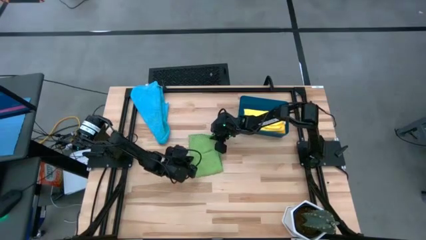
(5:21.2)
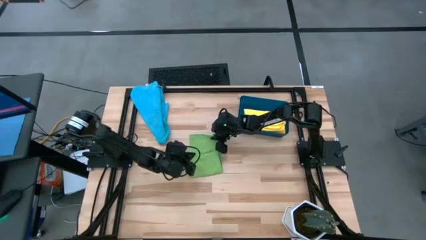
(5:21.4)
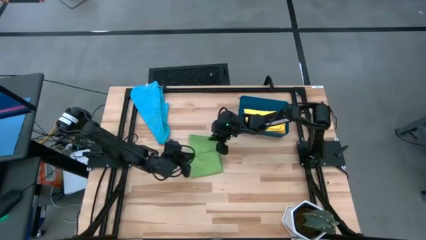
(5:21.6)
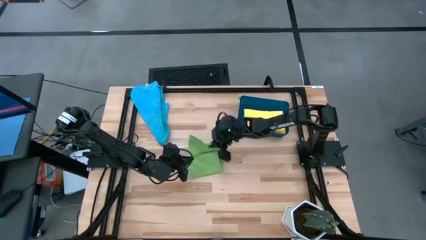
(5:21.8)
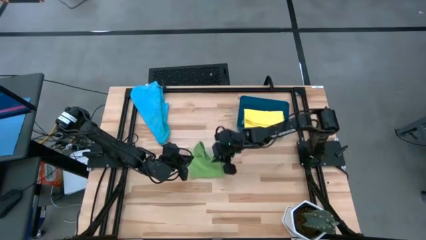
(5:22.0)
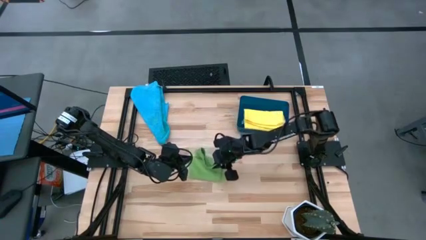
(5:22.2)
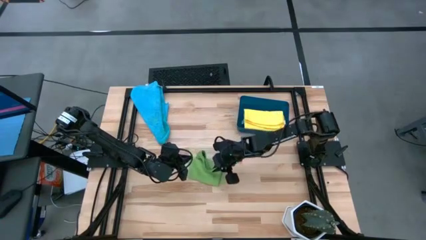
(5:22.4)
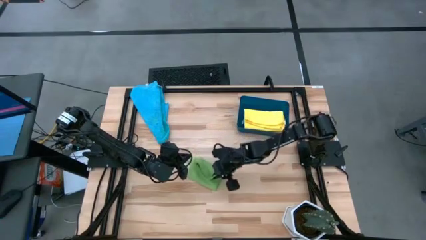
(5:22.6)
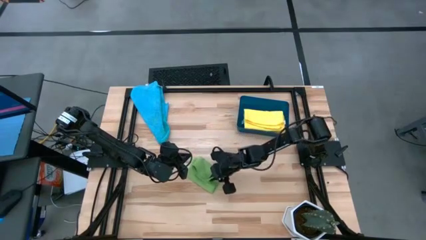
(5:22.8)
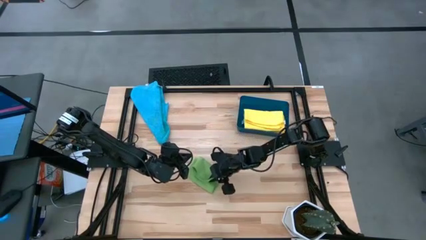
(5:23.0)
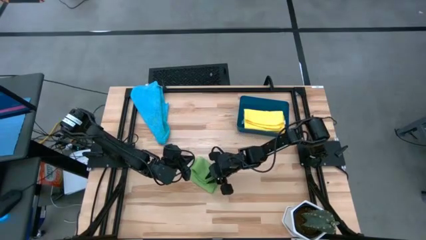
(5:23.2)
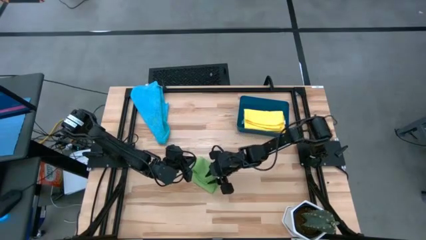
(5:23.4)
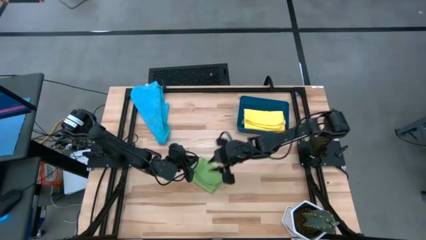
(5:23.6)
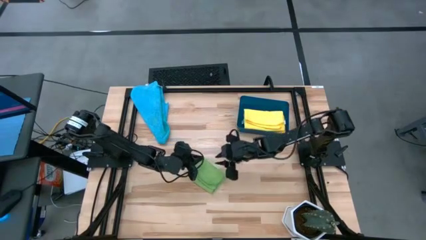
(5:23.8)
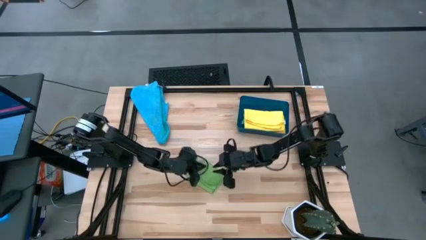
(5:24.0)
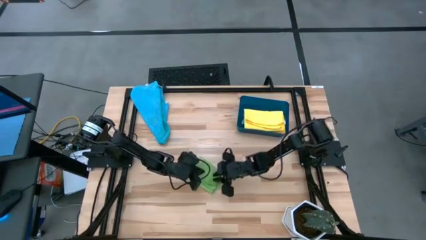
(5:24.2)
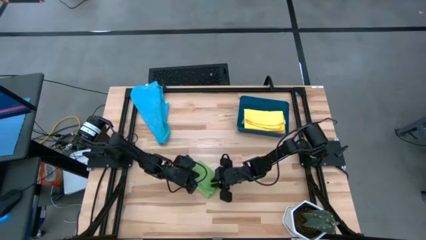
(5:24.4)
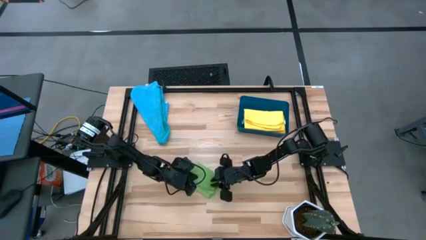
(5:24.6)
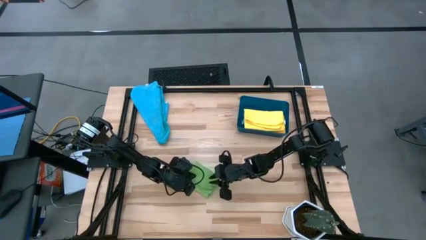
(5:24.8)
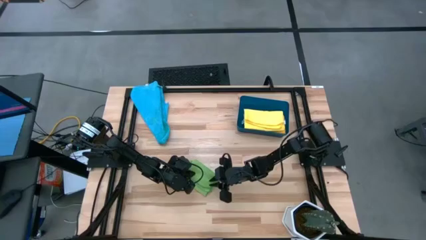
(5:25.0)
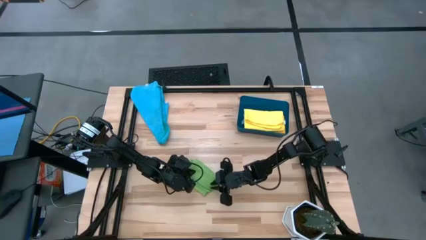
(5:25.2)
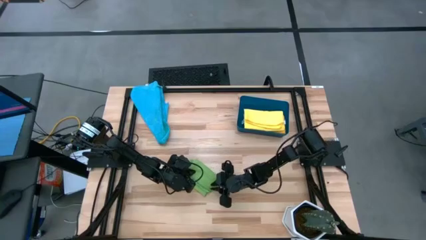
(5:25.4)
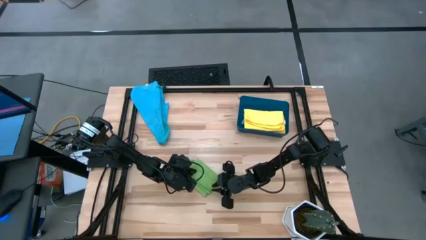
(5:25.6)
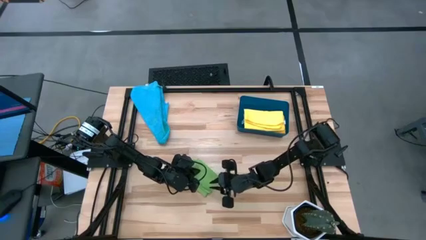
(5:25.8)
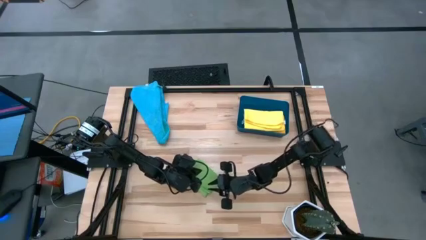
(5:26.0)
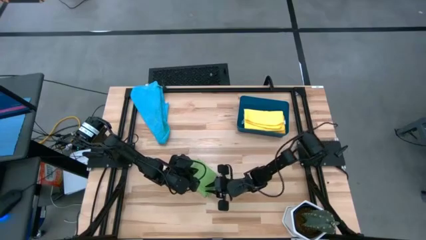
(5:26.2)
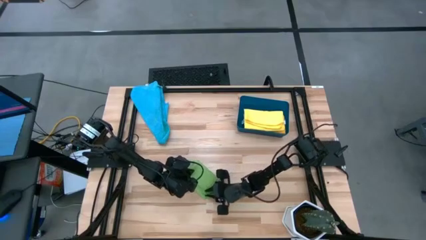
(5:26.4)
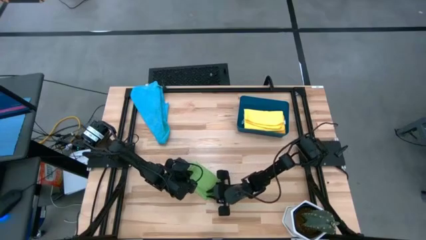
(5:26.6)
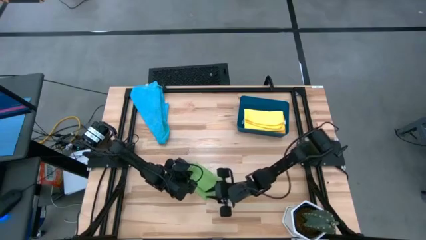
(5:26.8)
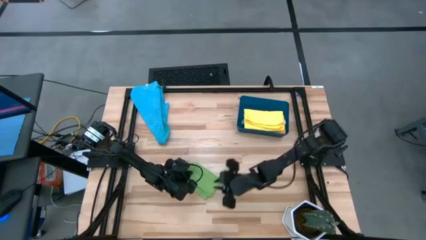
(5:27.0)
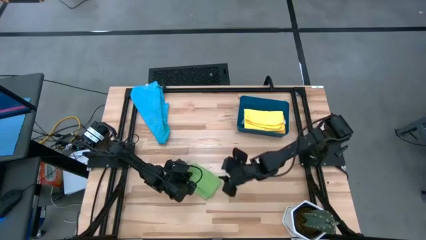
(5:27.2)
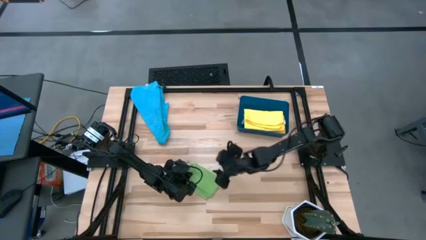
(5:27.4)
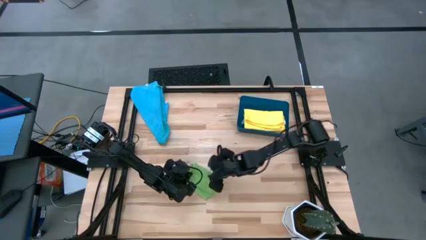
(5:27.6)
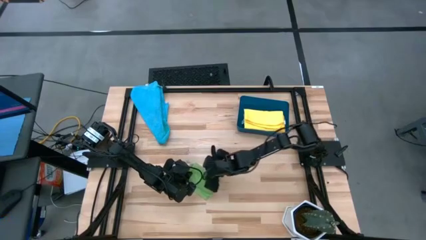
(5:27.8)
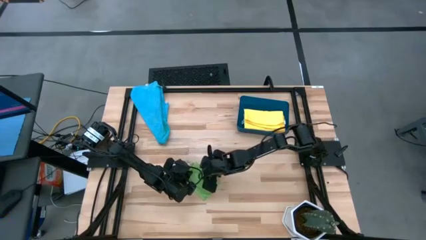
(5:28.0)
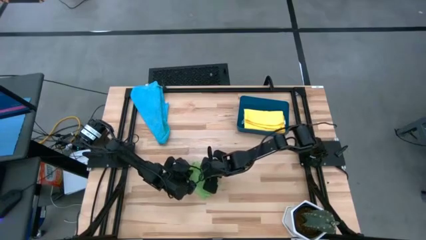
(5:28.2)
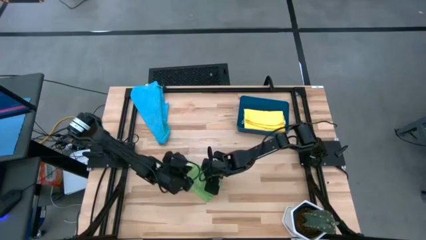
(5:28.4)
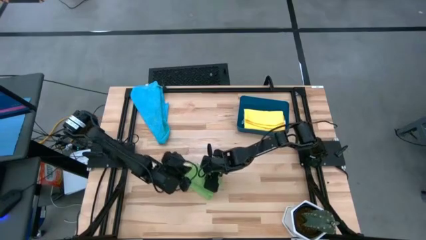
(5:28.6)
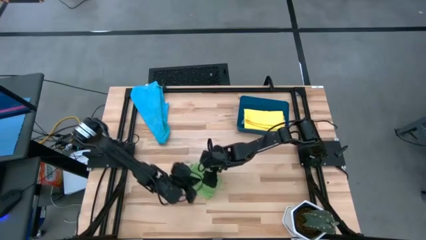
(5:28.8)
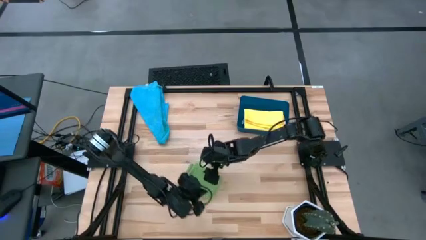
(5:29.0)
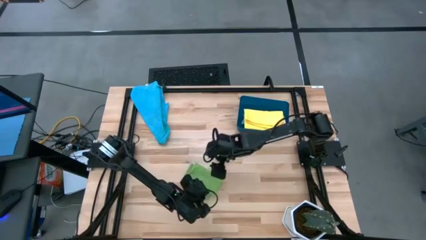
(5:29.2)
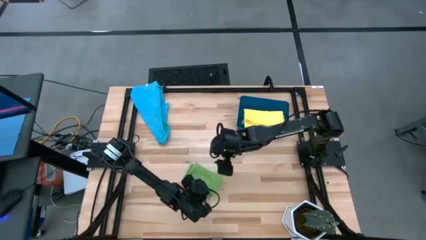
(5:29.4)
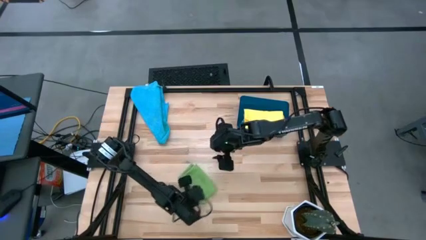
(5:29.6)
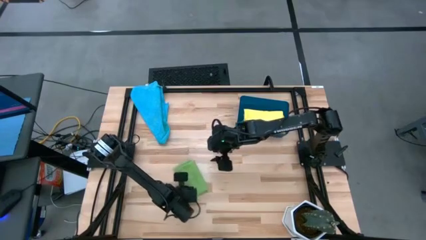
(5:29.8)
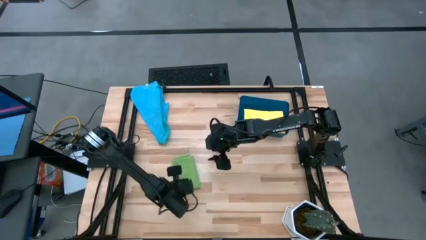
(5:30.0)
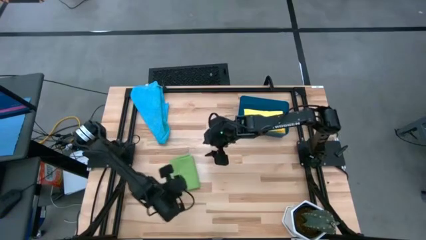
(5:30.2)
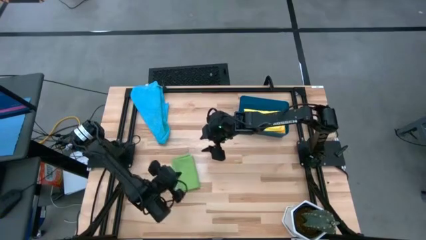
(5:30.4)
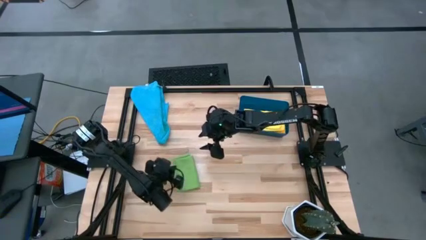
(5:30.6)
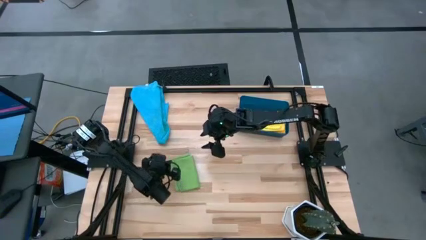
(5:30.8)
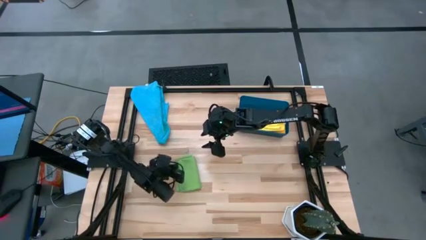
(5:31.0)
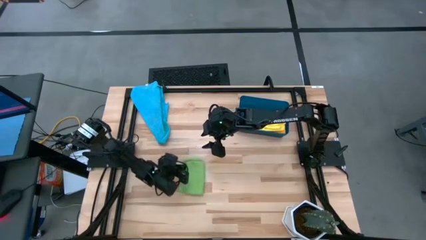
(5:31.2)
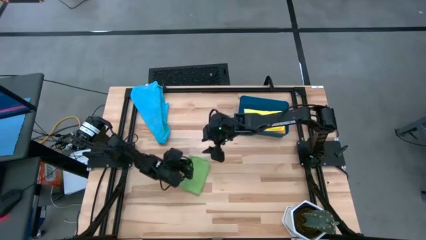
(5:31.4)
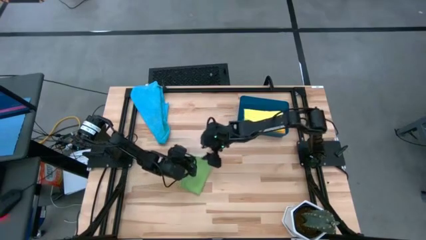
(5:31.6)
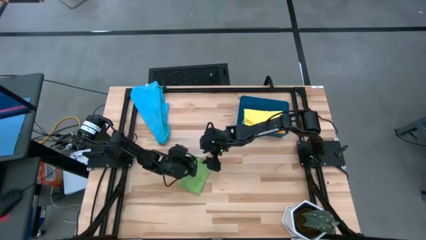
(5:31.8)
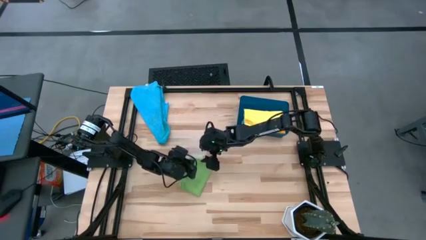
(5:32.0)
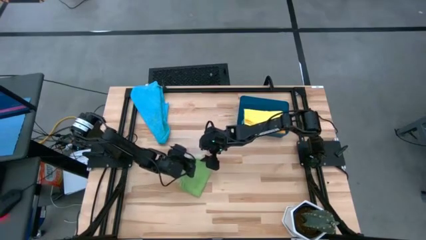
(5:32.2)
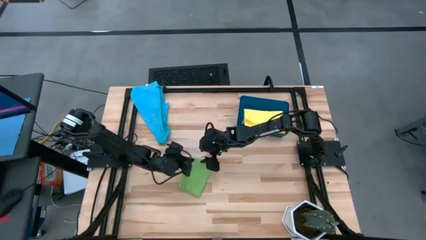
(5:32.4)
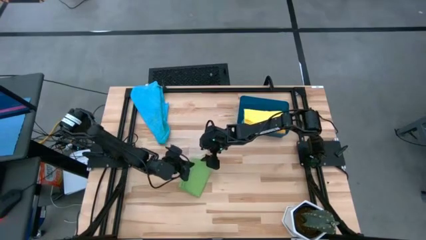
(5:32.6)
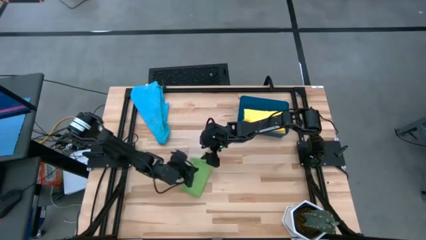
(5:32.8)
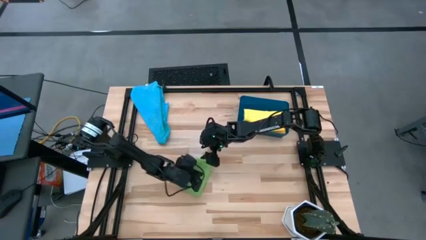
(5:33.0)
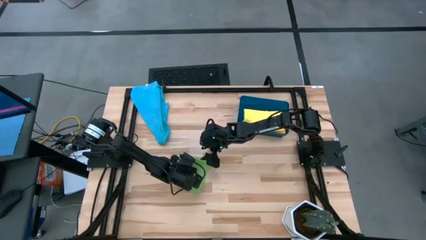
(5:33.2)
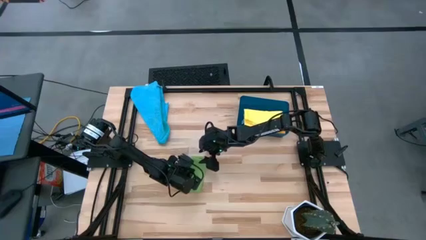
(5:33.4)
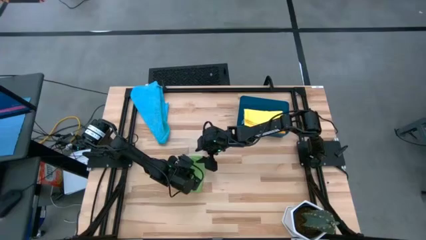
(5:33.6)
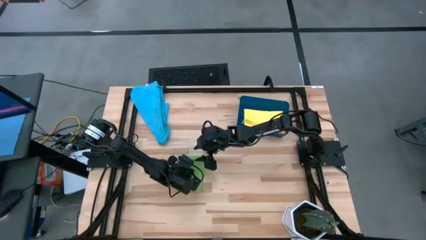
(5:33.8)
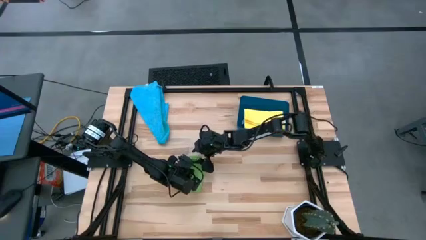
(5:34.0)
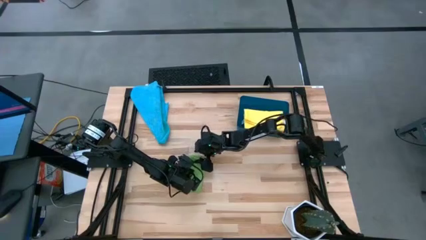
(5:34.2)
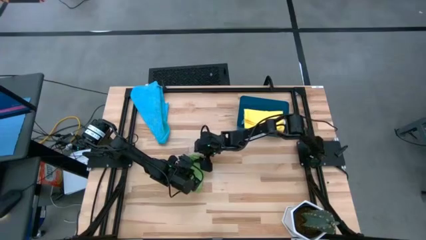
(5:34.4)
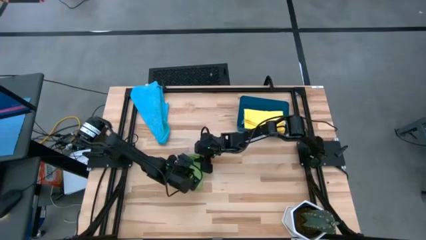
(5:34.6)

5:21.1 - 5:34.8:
Task: Fold microfiber towels
Fold the green microfiber cloth

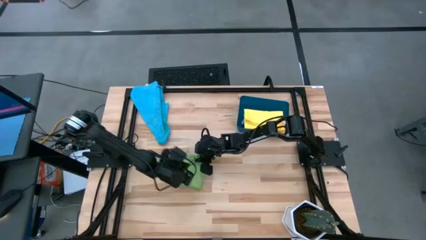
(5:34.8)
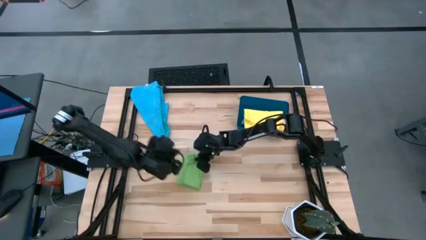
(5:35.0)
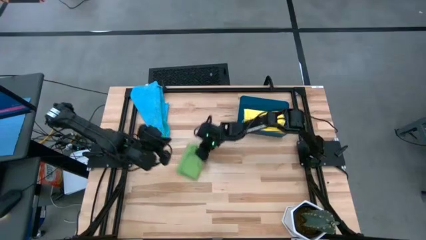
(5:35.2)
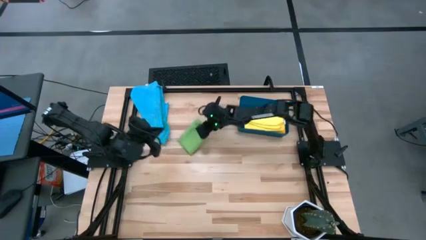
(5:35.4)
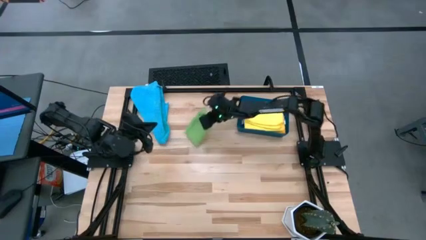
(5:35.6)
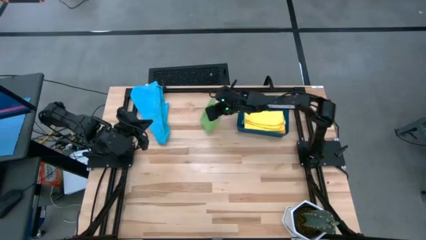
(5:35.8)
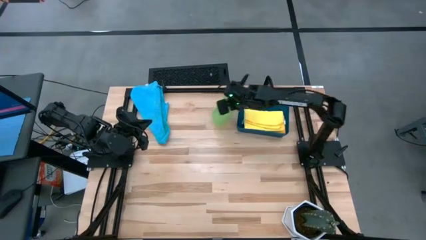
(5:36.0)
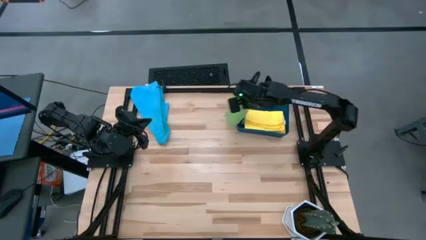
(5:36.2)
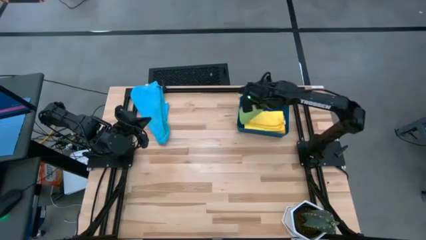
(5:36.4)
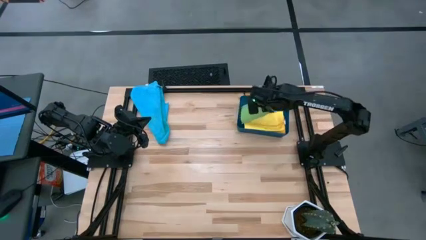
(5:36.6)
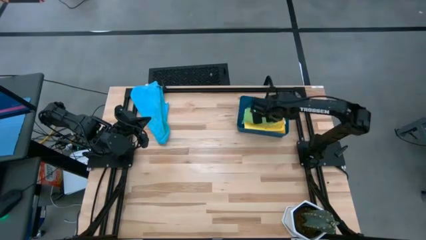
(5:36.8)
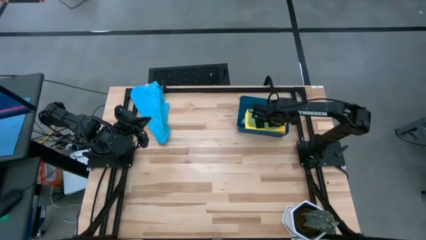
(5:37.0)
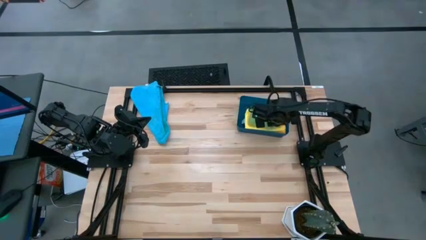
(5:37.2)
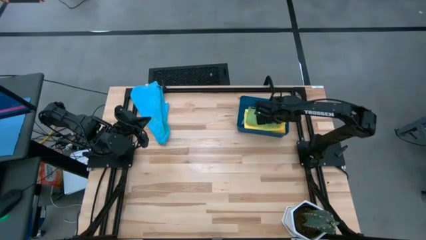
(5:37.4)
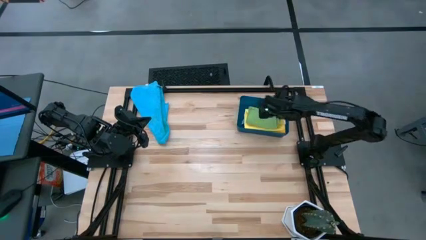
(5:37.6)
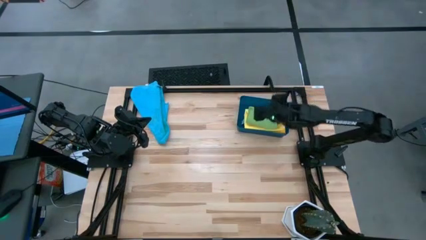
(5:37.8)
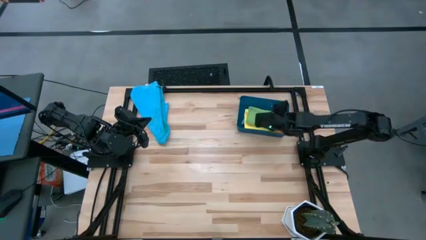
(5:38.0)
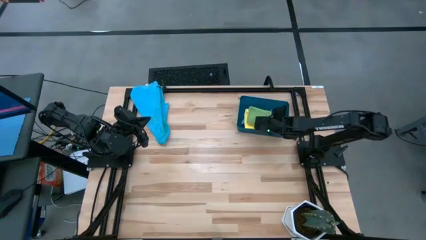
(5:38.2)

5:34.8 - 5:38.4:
Put the green microfiber cloth into the blue bin
